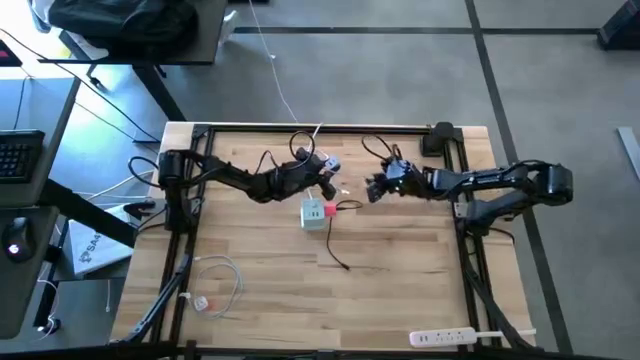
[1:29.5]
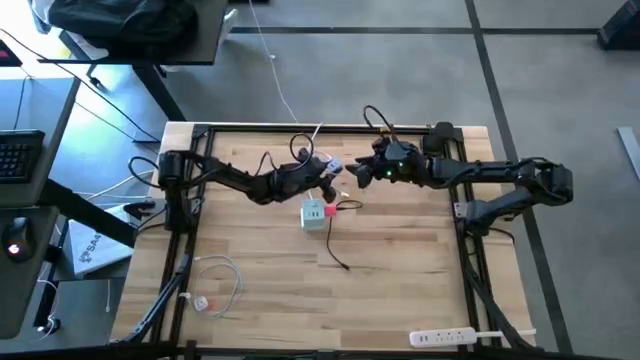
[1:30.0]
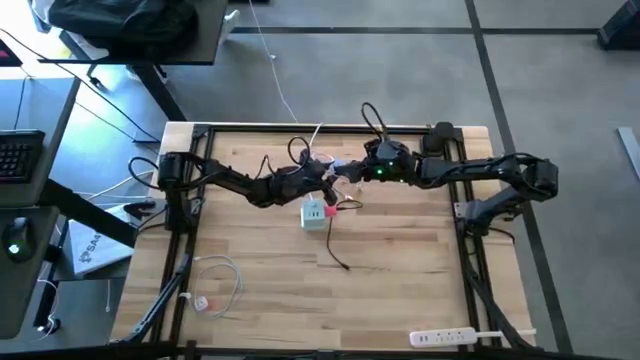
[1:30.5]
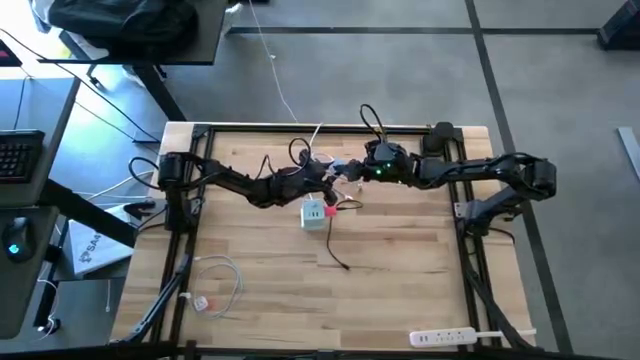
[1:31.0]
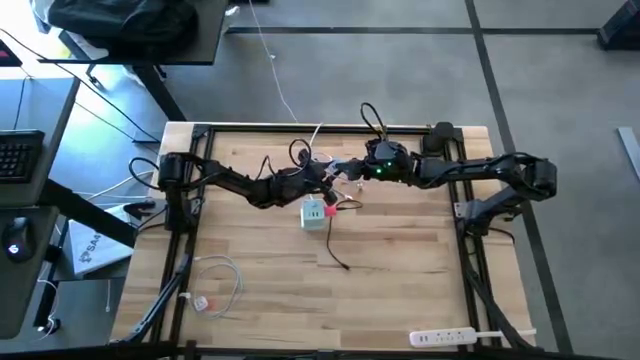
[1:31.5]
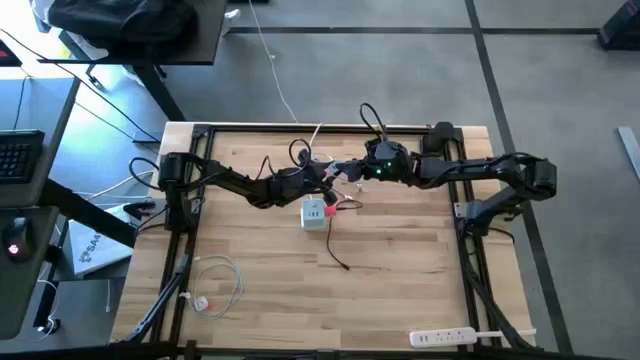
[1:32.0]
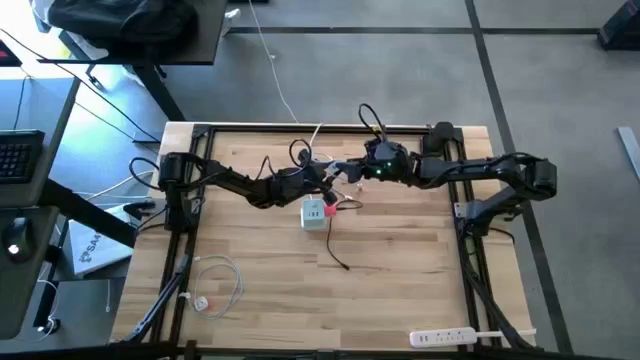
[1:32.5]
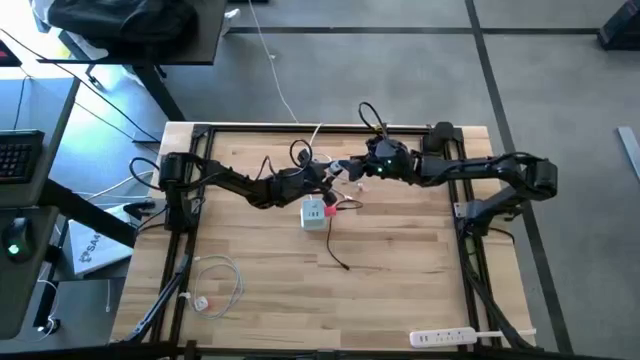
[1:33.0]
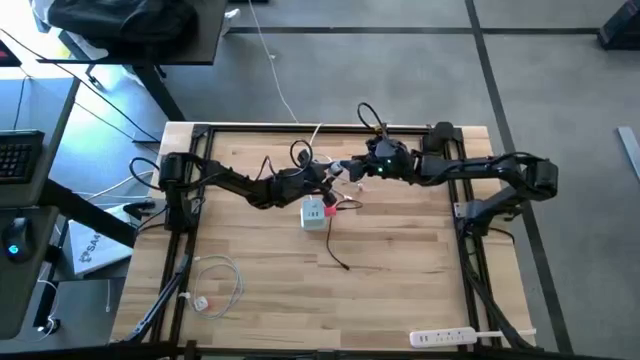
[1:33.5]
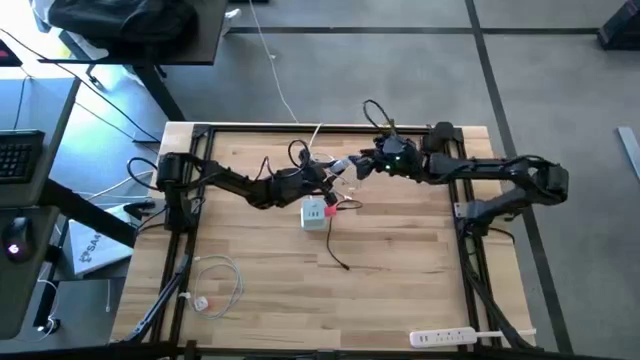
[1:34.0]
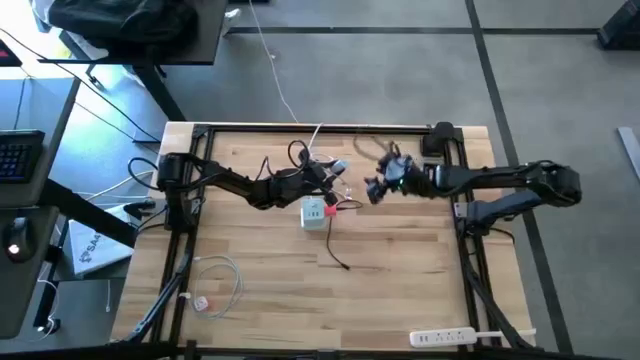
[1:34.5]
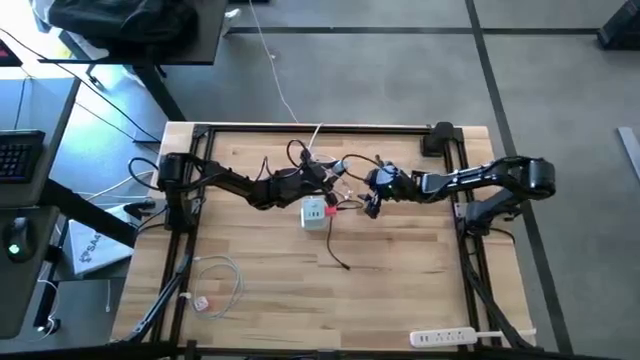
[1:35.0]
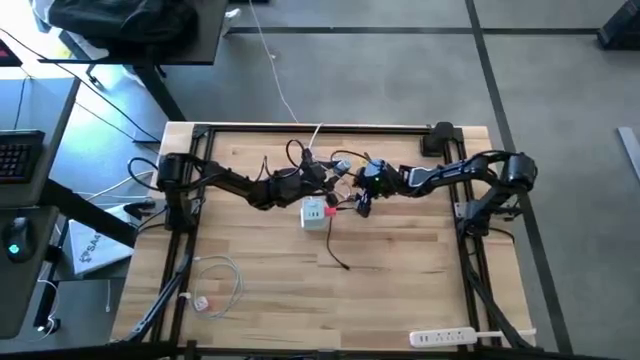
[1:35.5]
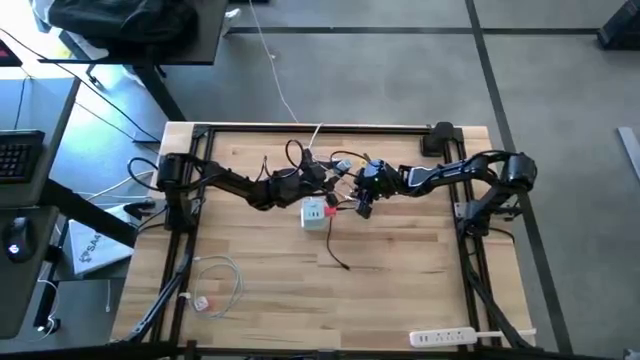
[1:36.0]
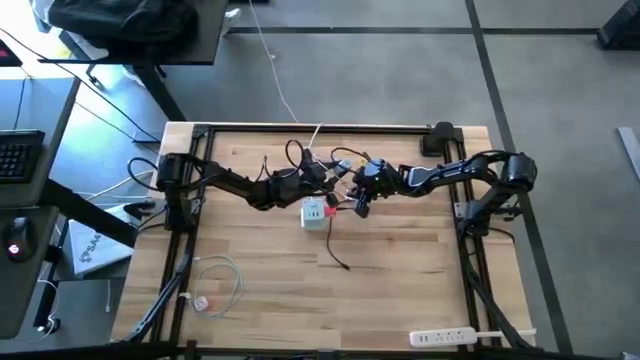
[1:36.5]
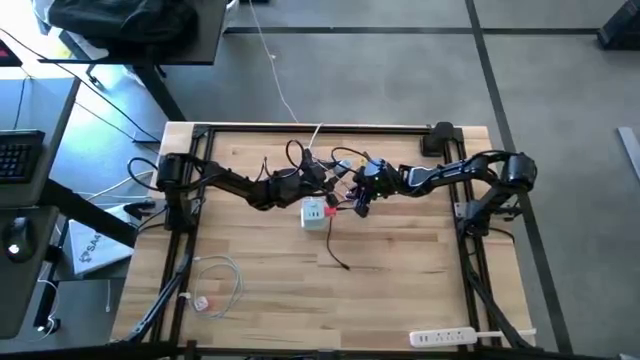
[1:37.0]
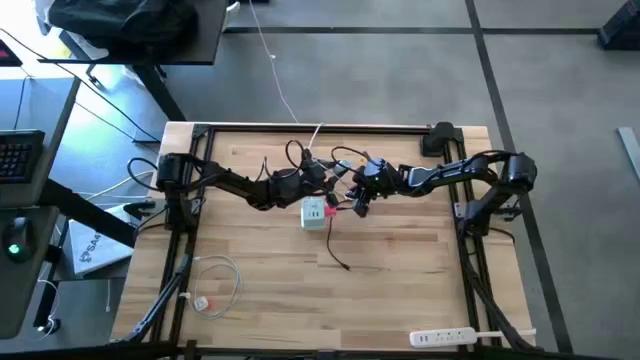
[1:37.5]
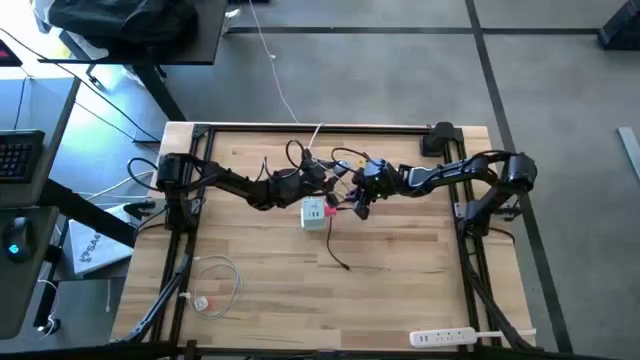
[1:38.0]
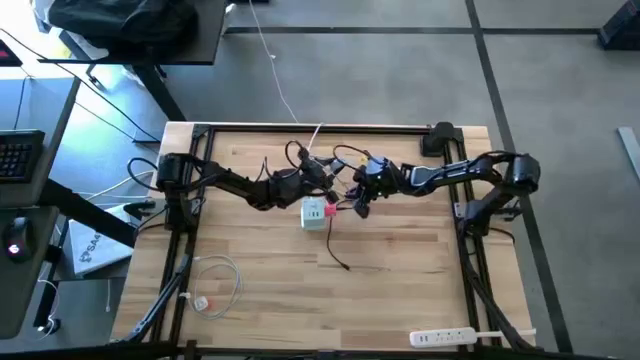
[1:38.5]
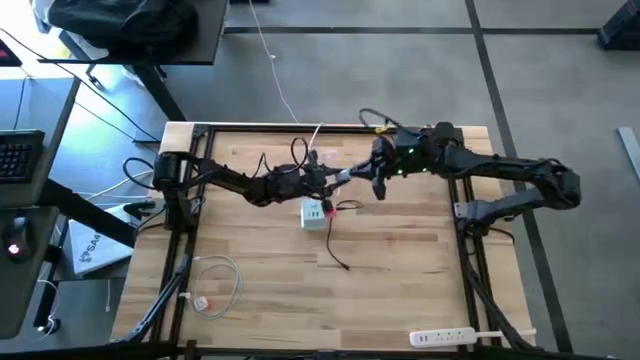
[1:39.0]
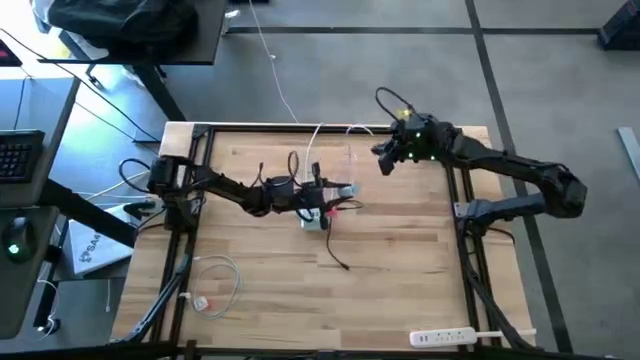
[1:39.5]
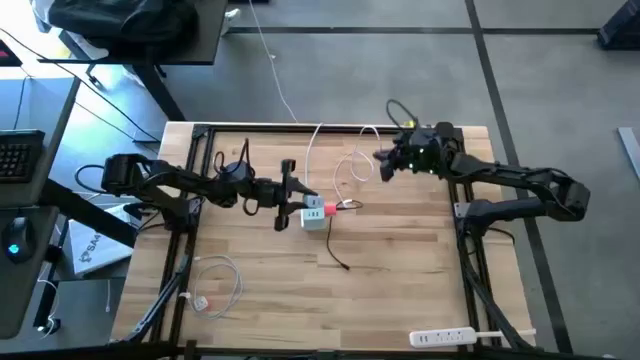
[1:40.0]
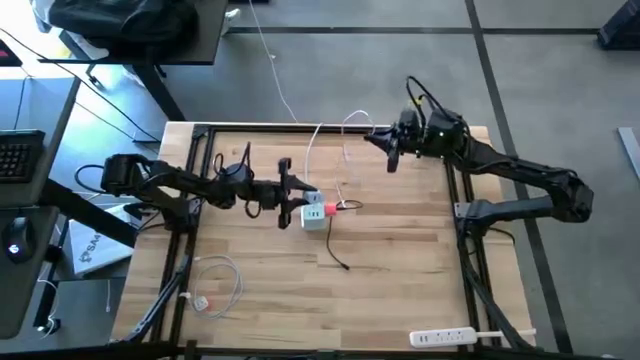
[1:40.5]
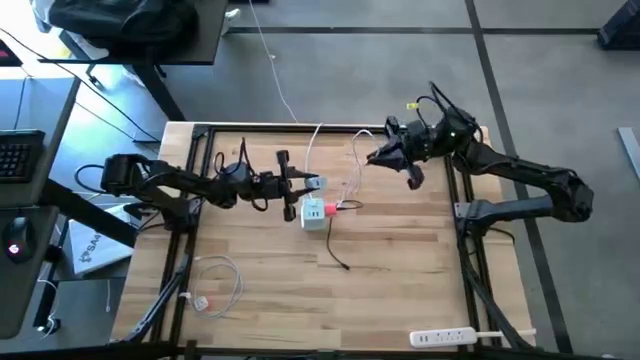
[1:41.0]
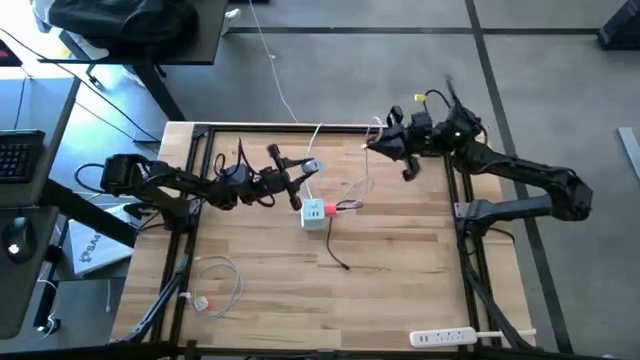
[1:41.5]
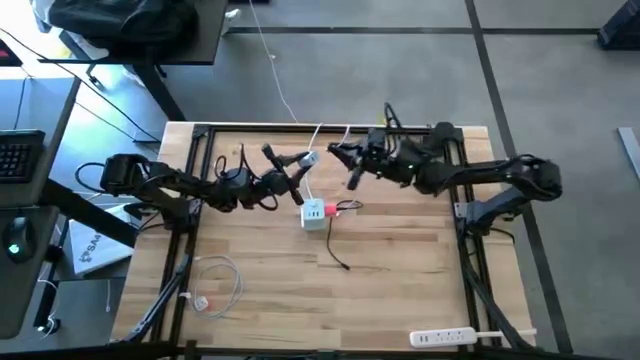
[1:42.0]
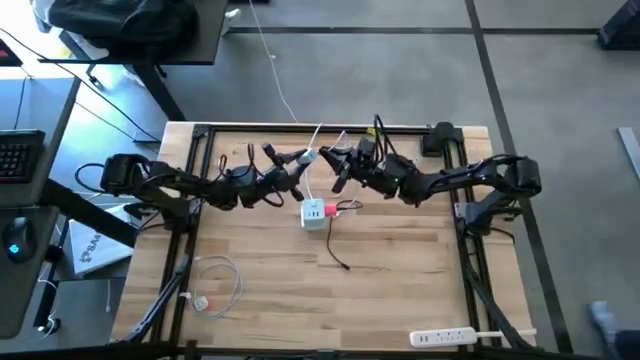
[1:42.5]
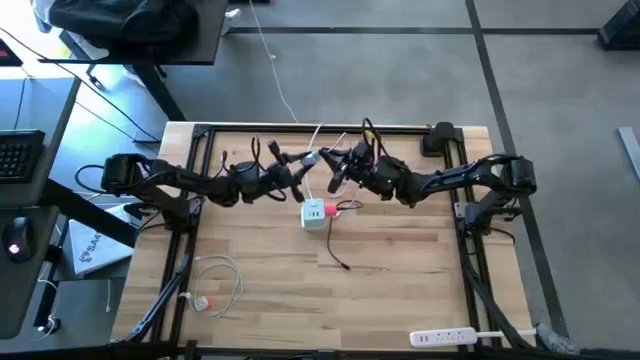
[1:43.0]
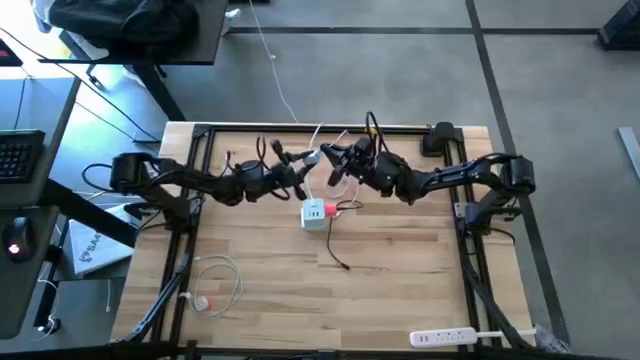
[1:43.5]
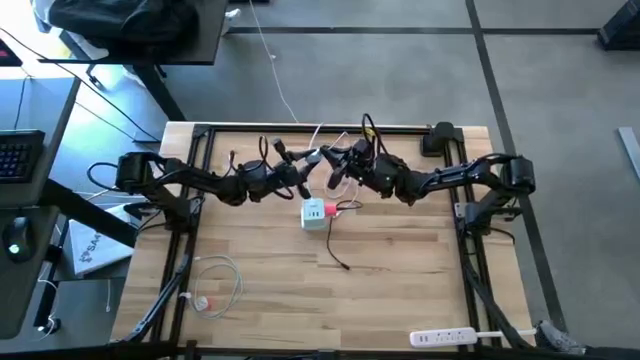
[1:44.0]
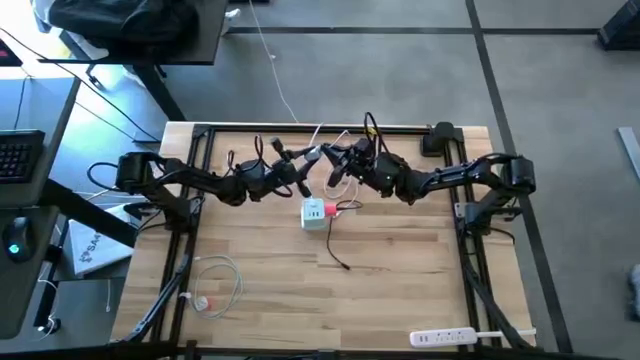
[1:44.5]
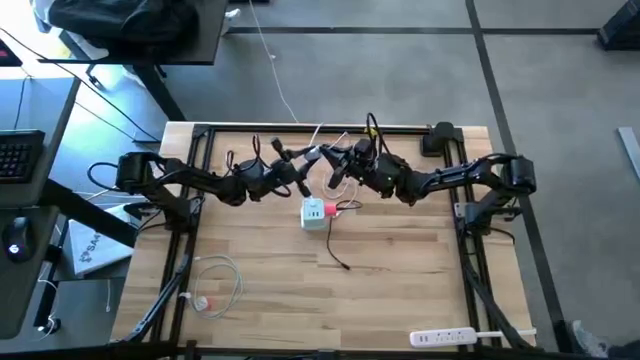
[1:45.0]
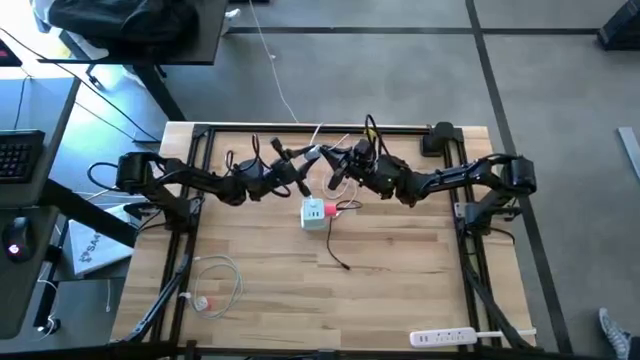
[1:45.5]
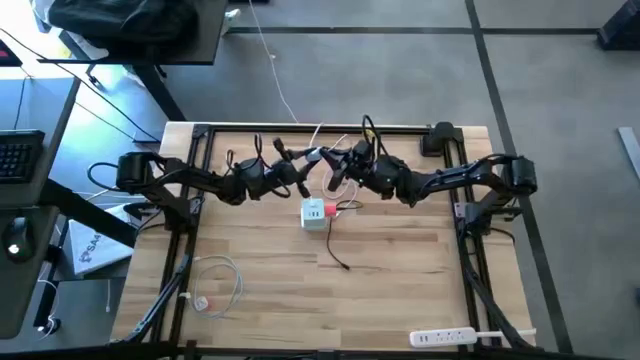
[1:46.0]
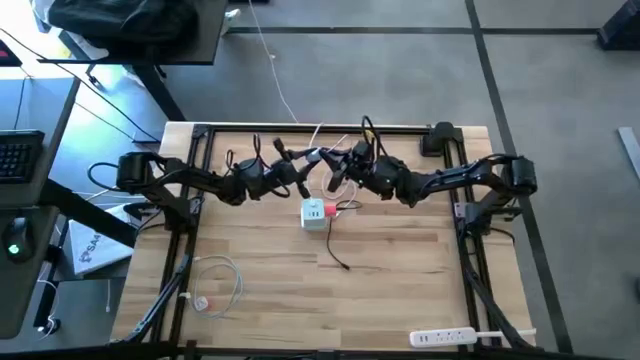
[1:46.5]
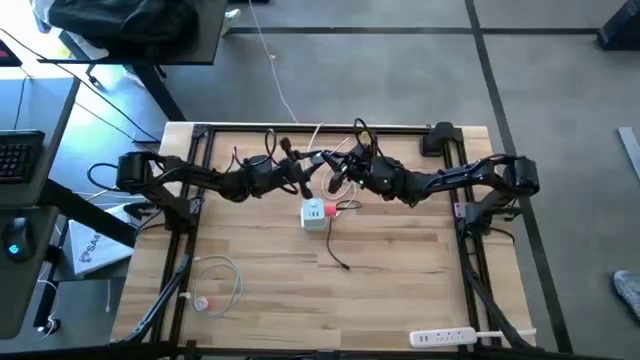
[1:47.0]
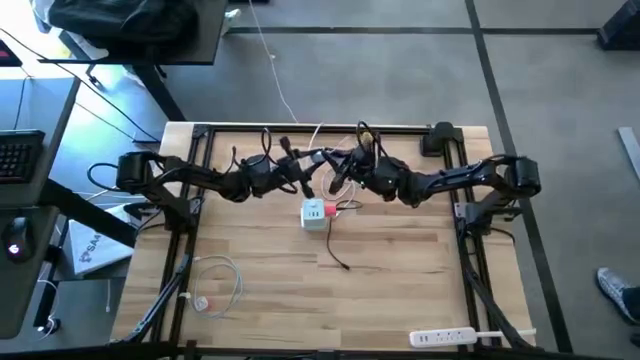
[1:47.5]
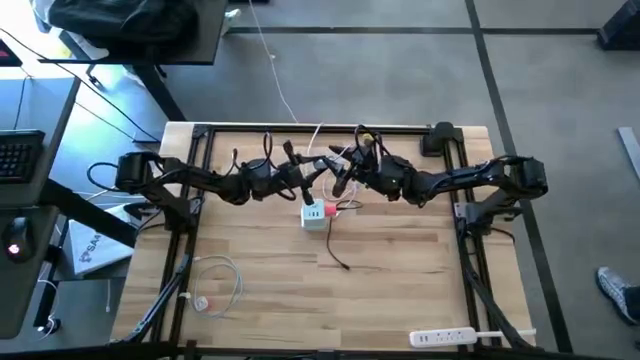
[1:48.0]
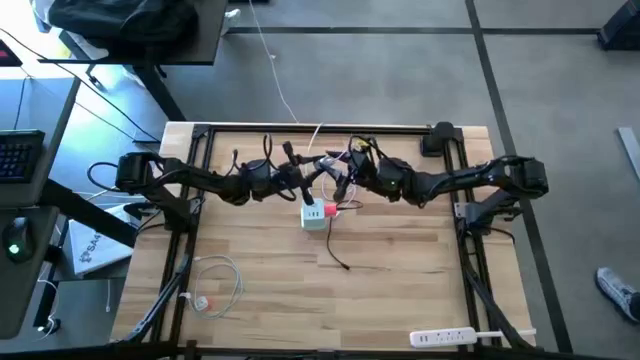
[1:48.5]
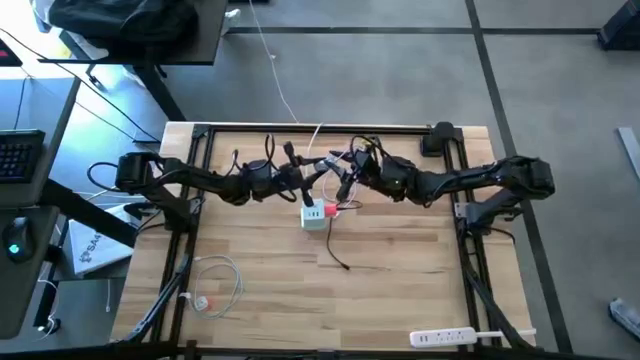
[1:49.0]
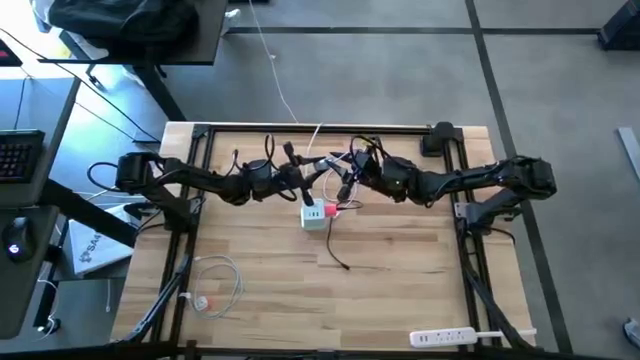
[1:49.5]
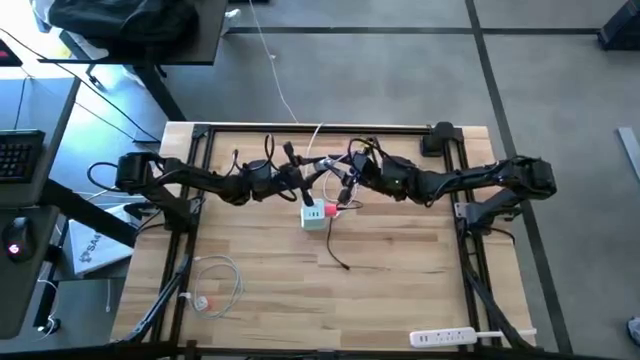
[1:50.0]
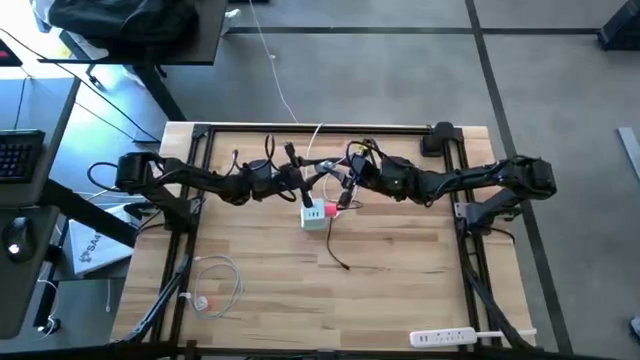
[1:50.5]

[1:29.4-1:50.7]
Task: Insert USB
Insert the light pink charger cable into the white charger adapter

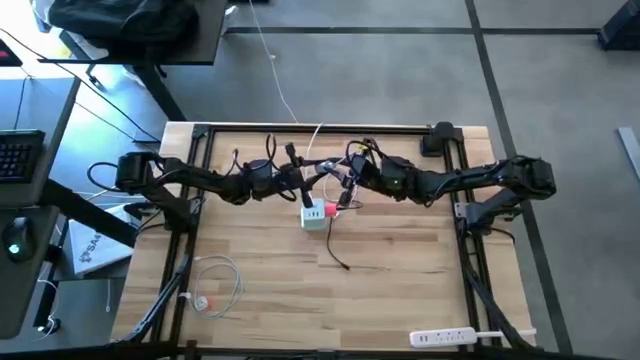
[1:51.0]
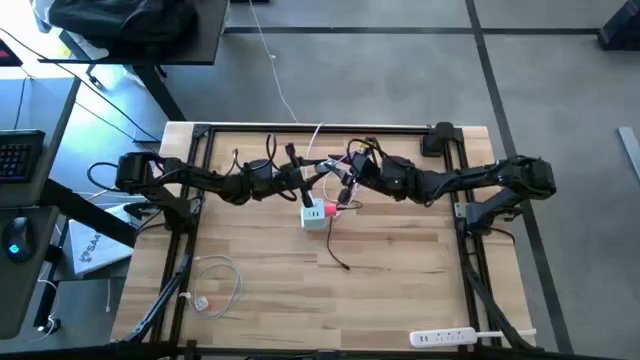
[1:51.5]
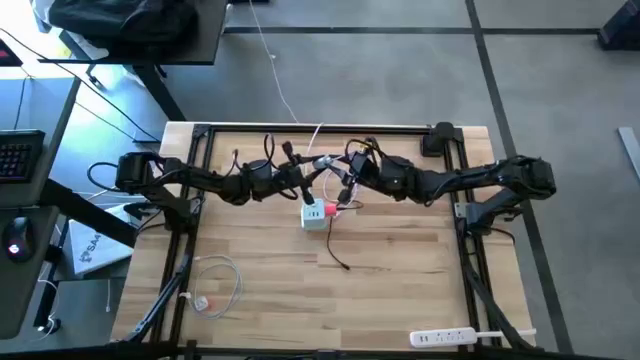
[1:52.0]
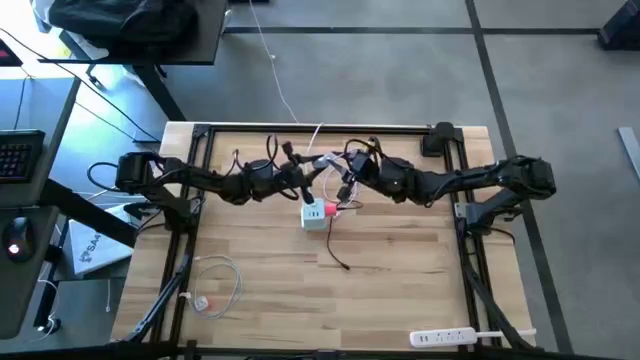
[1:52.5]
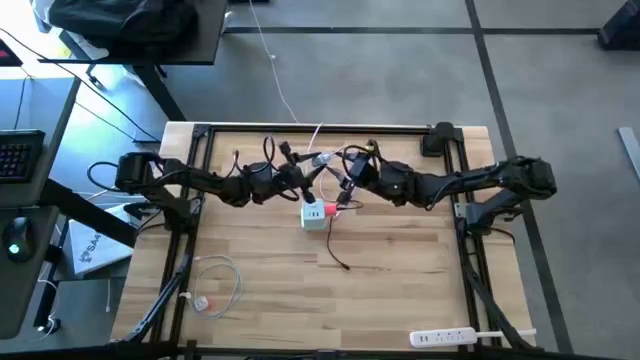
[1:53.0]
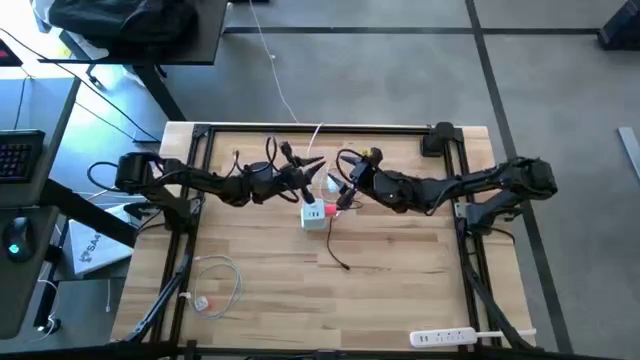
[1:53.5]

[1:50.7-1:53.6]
Insert the white charger adapter into the black outlet extension
